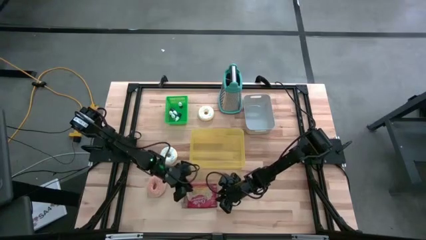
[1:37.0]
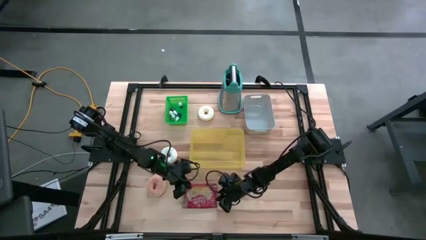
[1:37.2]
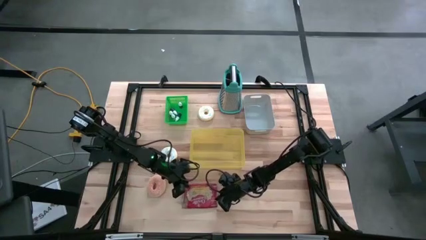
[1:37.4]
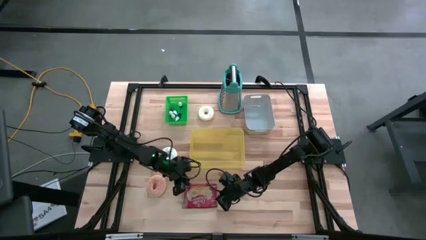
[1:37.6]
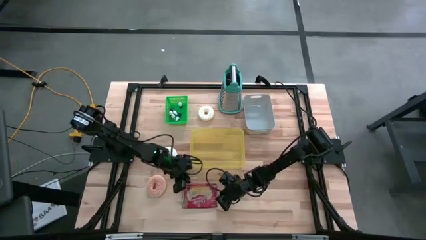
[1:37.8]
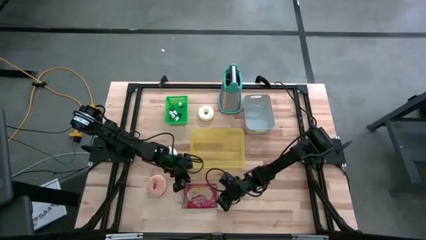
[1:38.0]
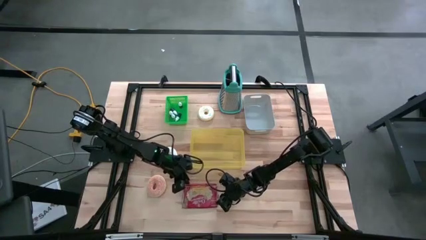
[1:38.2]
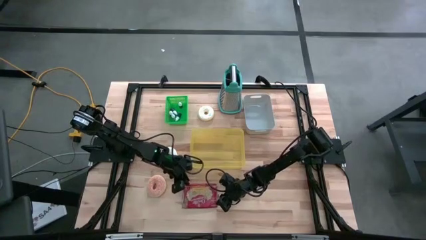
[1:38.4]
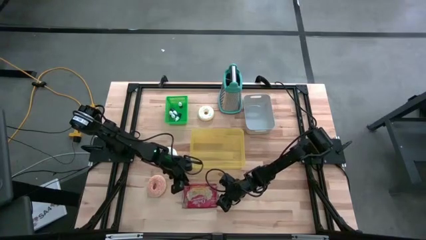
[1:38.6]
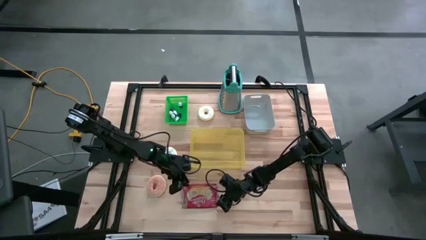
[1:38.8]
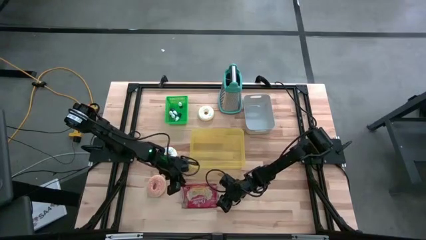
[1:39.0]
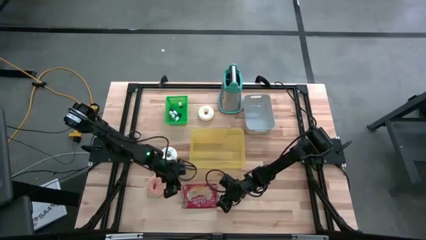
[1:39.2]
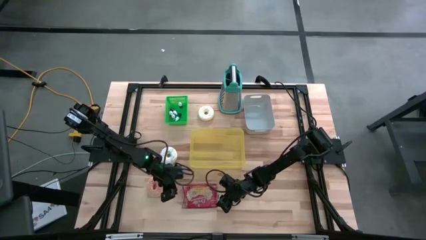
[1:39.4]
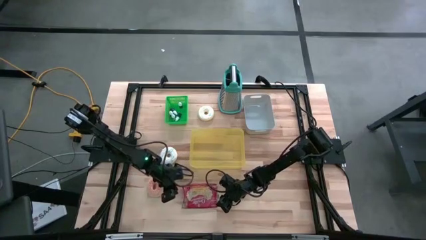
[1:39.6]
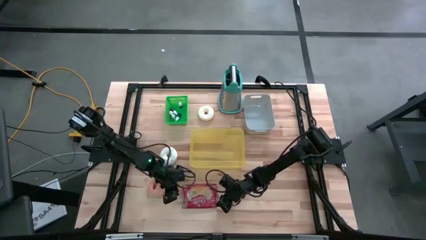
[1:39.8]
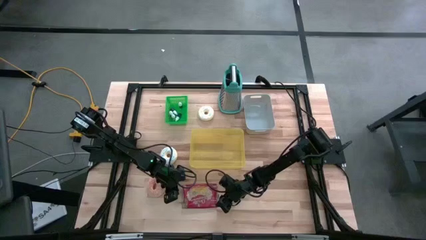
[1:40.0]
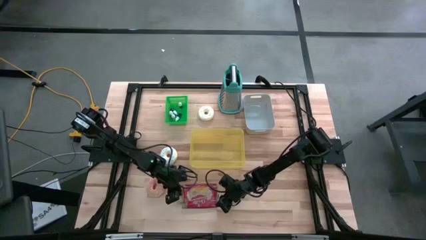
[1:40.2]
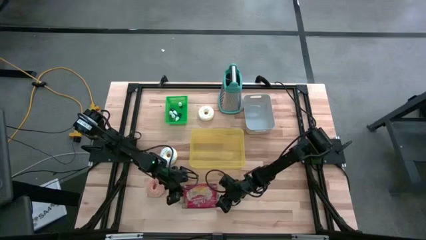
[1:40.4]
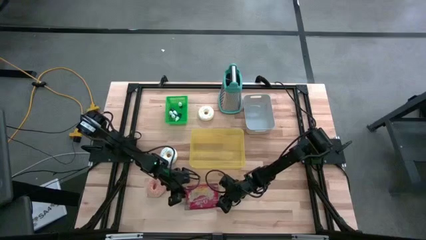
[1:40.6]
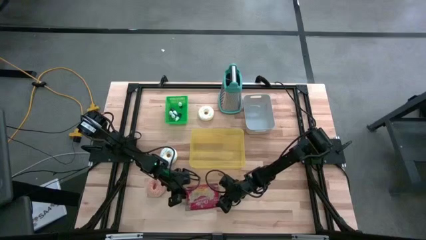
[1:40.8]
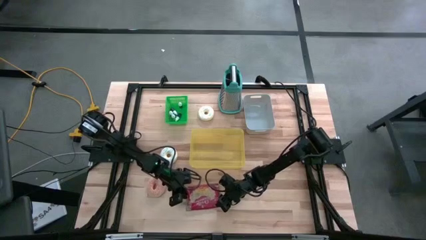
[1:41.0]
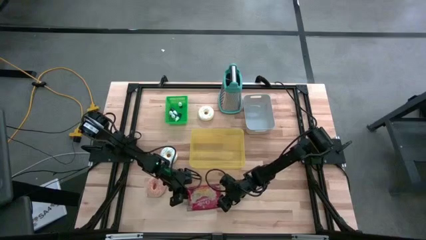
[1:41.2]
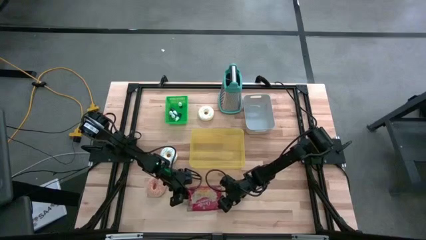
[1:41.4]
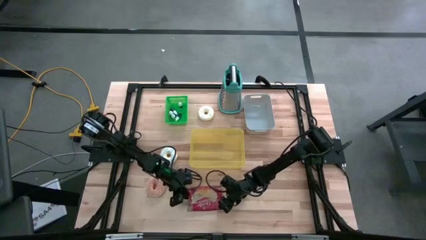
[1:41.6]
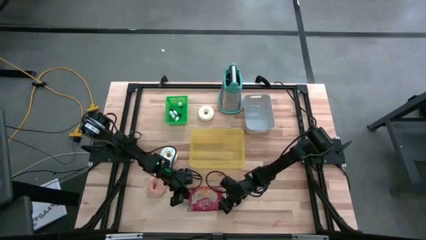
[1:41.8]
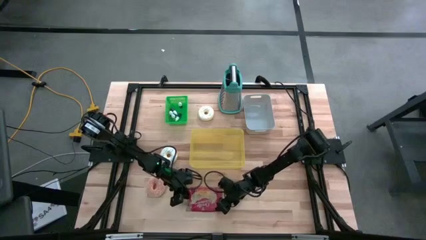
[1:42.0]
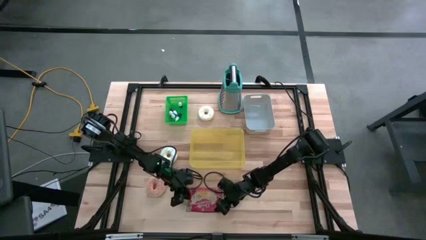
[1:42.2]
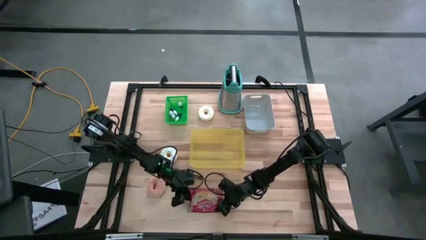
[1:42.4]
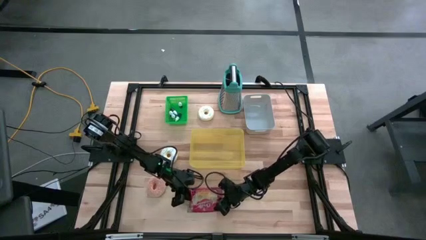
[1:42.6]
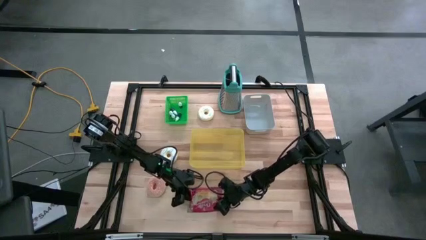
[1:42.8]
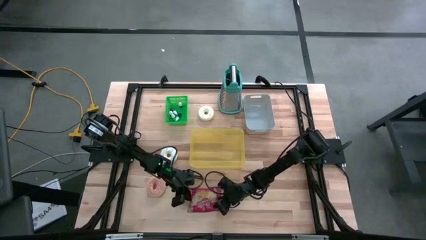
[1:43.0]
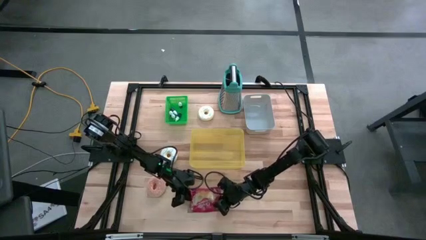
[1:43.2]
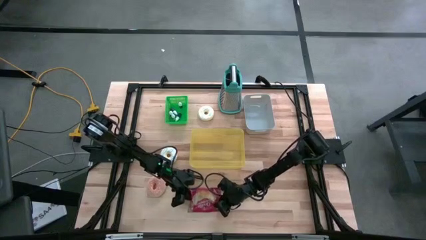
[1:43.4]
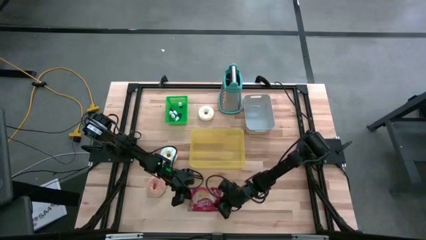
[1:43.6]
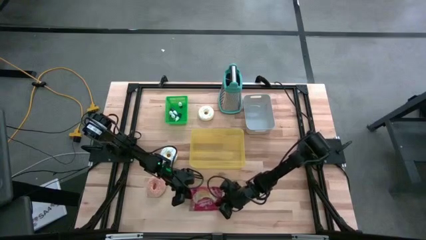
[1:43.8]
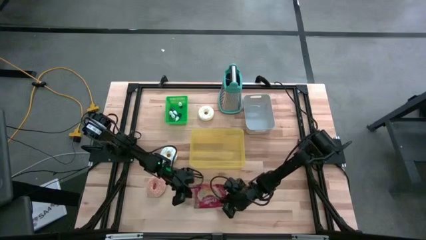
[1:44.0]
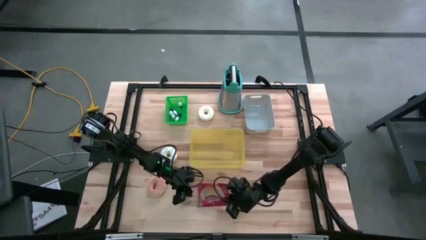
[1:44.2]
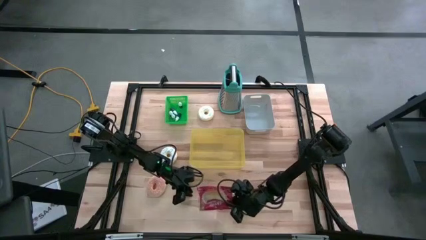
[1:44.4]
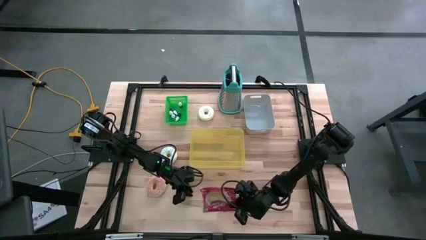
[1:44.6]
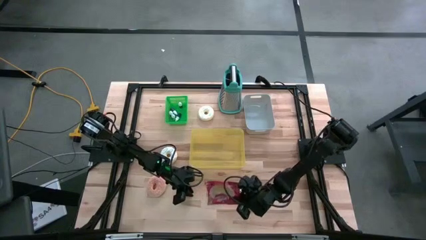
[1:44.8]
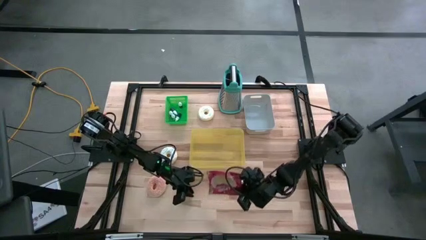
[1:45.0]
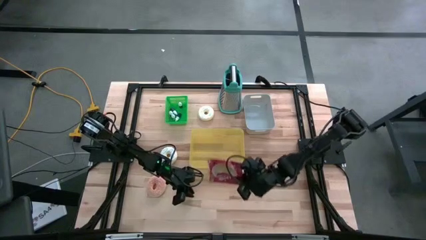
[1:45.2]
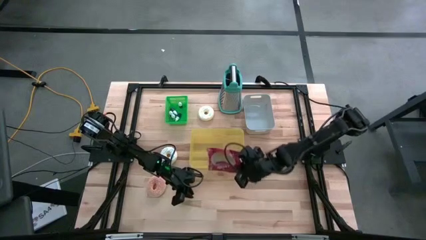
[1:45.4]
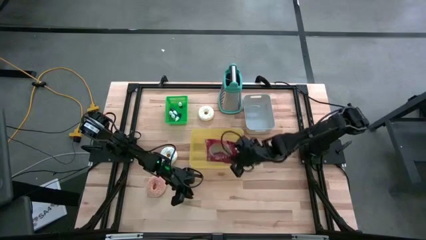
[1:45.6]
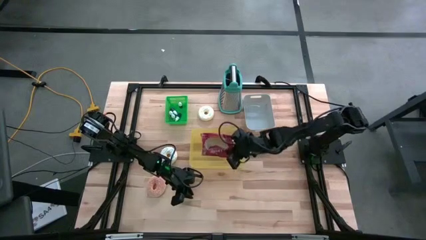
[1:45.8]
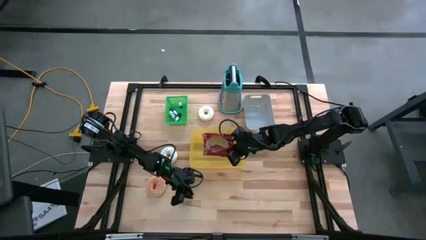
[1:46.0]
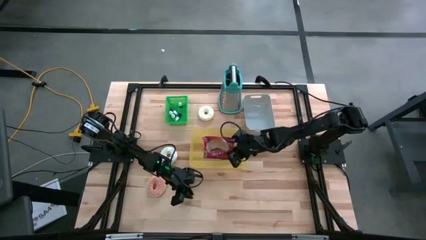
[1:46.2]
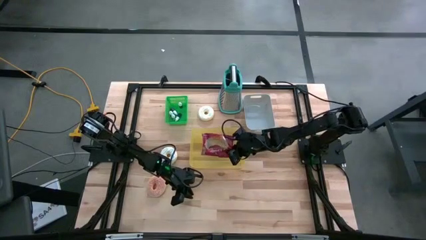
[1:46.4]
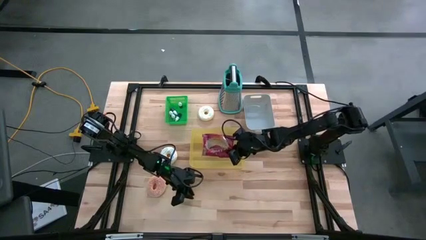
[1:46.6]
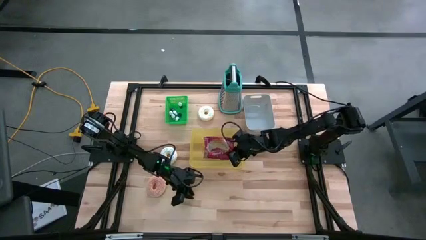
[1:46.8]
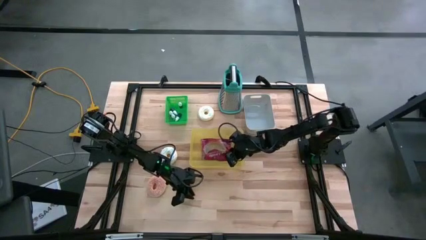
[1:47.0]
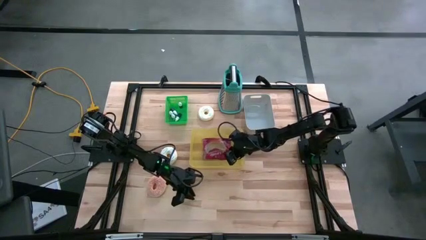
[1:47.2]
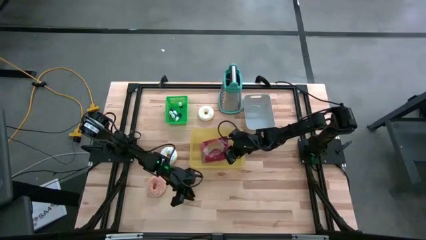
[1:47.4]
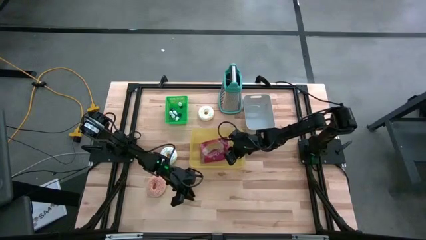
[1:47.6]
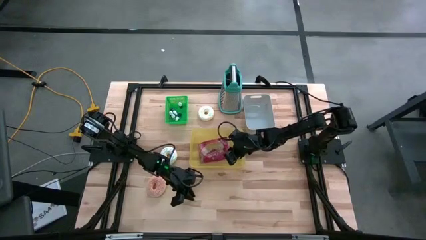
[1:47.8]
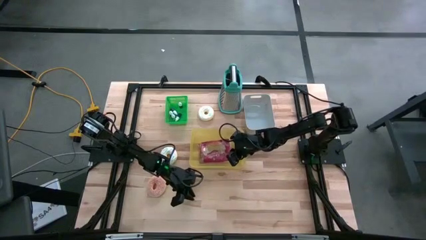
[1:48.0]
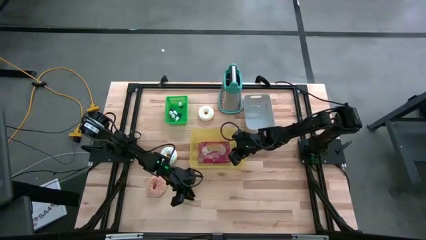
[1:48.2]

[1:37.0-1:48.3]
Put the red popcorn bag into the yellow bin

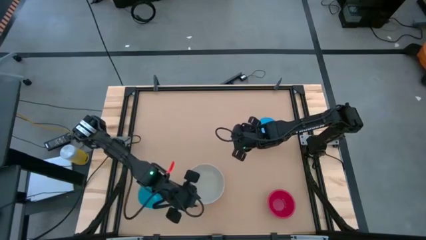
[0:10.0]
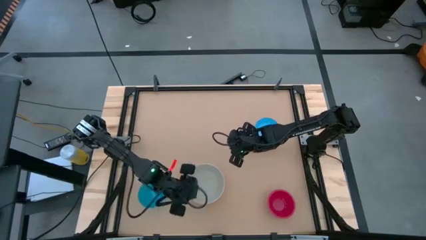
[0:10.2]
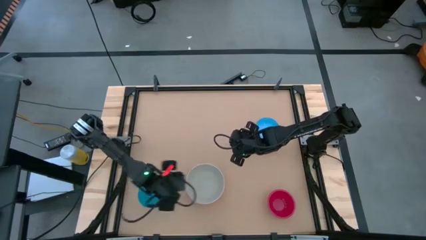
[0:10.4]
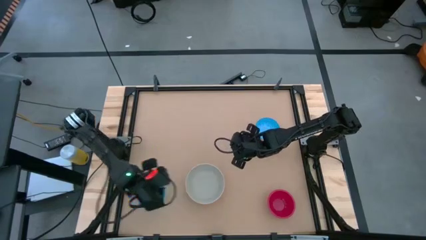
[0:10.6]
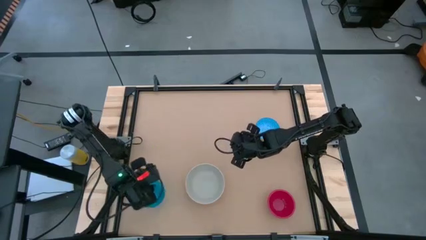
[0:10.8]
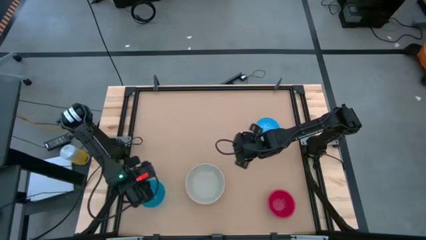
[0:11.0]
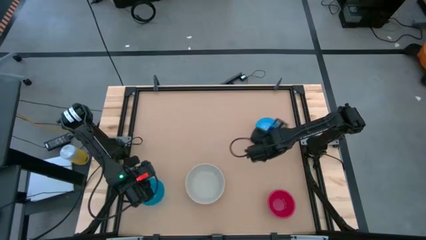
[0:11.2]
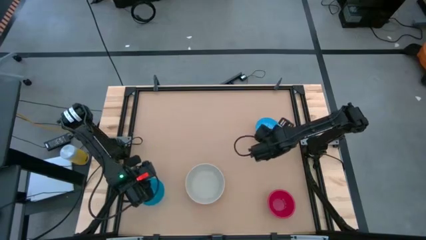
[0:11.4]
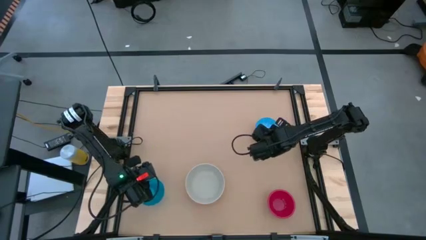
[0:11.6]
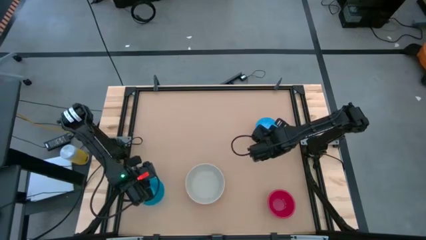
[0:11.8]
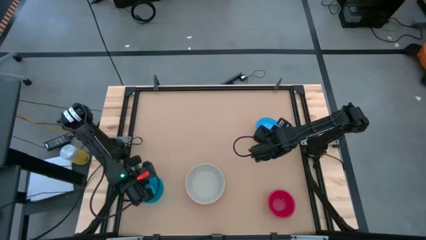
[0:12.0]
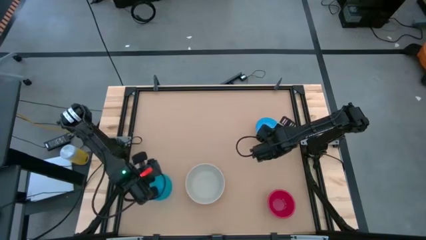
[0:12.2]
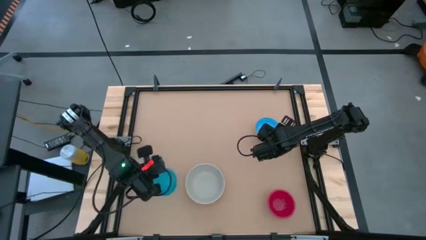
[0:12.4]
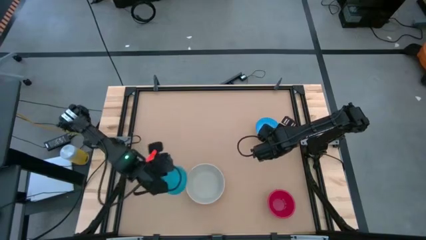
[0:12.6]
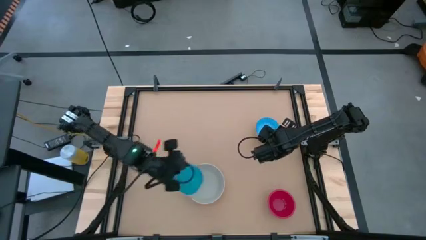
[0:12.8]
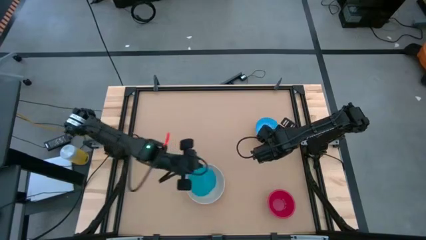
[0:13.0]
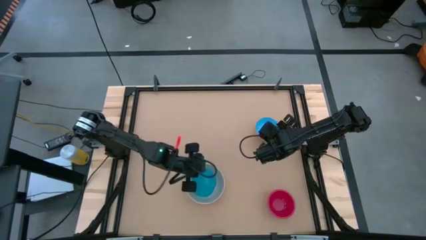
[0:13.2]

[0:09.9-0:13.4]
Stack the blue bowl on the gray bowl

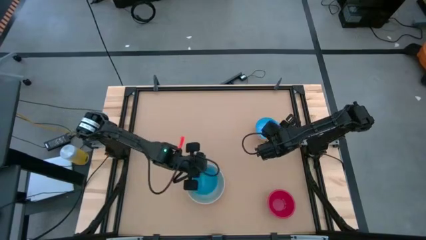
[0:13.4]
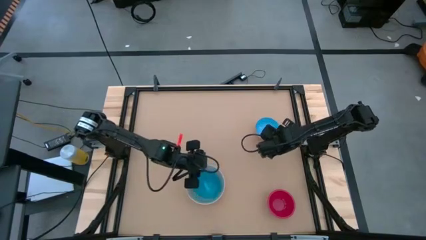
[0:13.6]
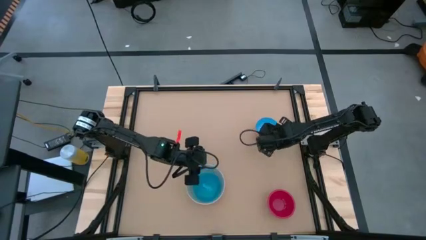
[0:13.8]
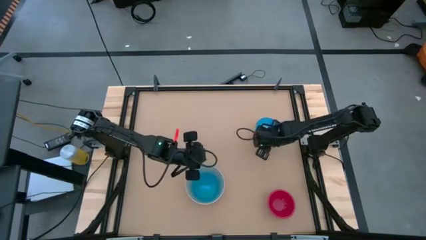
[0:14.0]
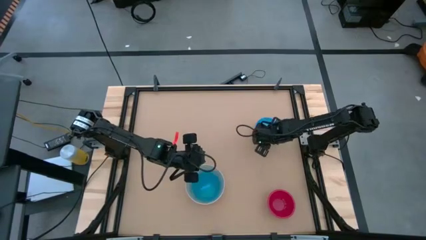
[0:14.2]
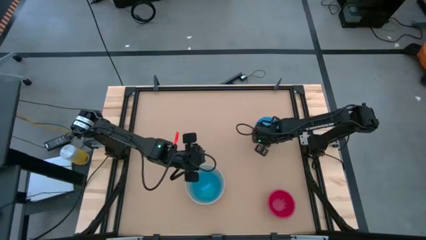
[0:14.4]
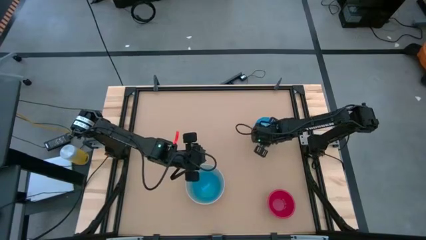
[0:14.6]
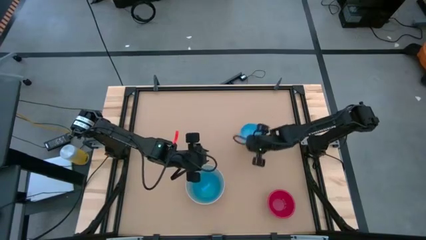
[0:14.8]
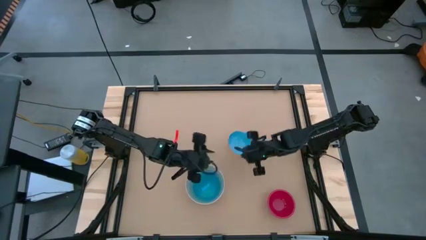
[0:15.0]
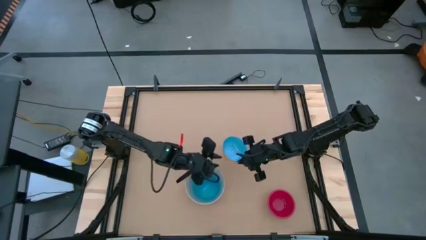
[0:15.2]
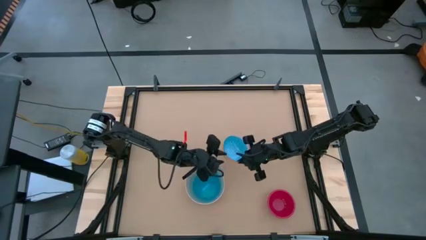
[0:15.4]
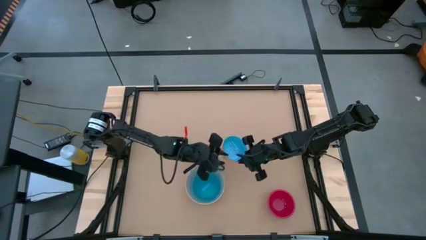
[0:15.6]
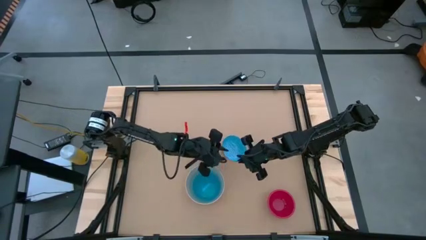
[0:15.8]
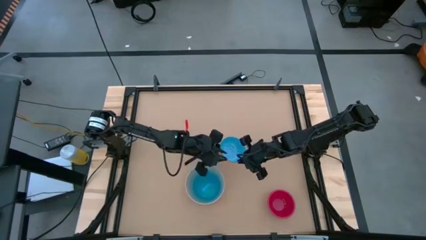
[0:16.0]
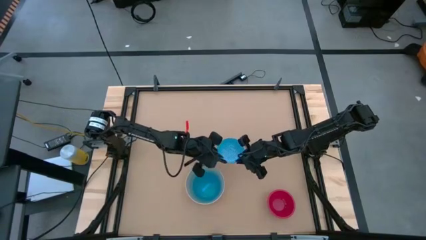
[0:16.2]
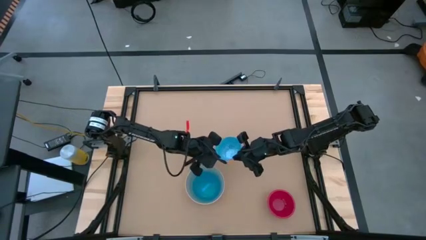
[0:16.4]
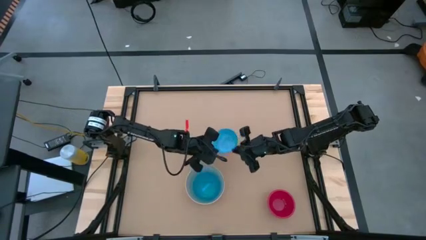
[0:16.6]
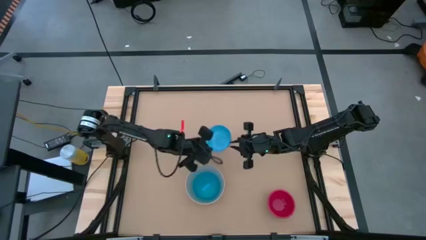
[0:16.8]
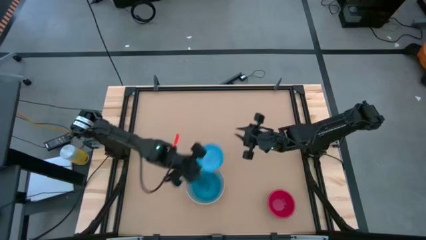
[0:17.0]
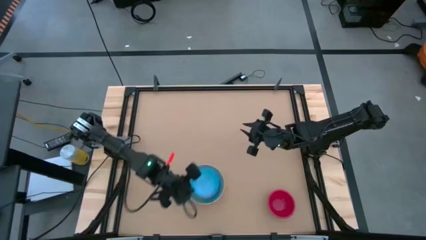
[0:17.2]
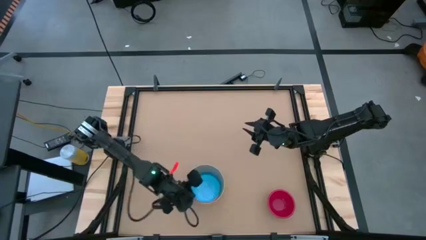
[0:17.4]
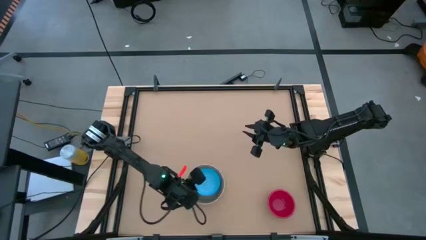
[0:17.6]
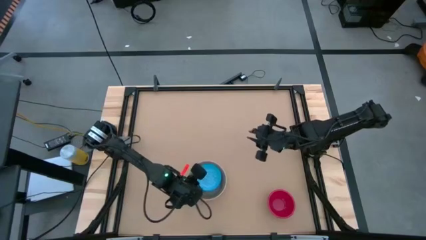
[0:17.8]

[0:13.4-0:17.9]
Stack the blue pattern bowl on the blue bowl
